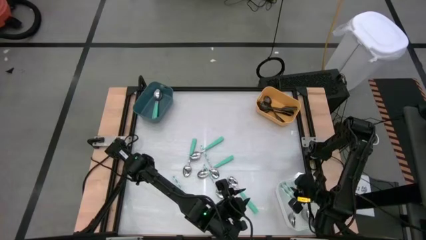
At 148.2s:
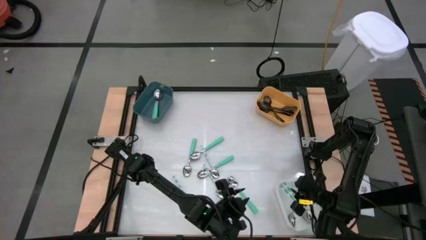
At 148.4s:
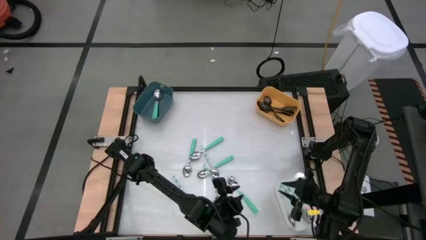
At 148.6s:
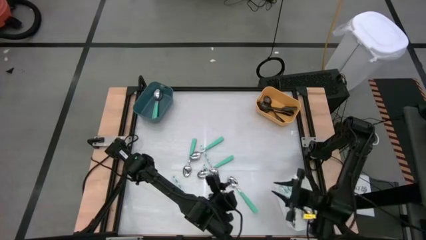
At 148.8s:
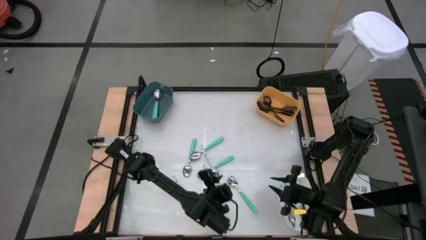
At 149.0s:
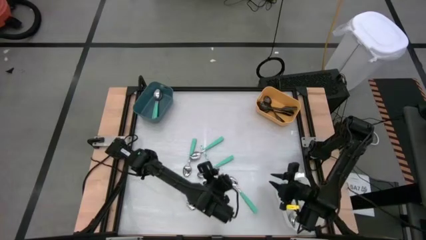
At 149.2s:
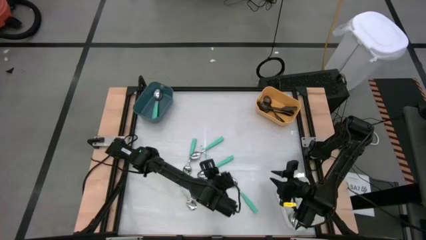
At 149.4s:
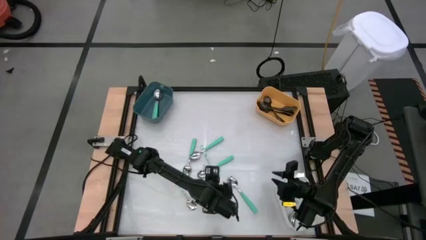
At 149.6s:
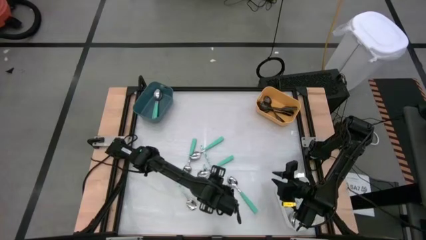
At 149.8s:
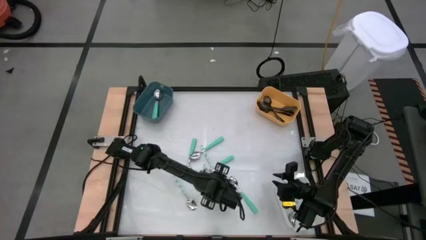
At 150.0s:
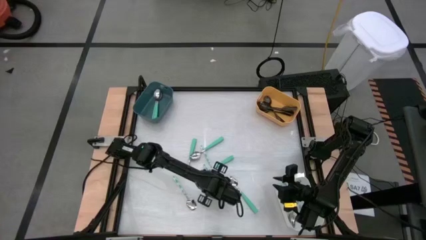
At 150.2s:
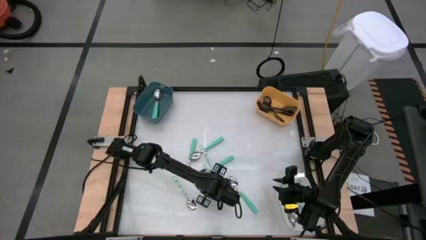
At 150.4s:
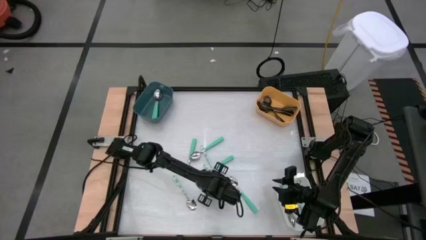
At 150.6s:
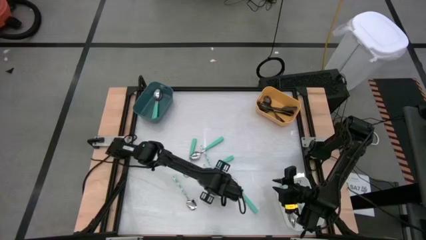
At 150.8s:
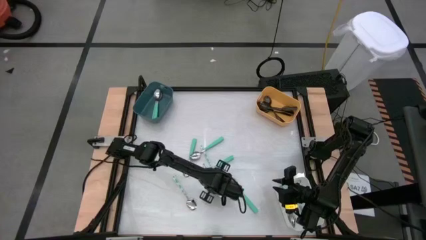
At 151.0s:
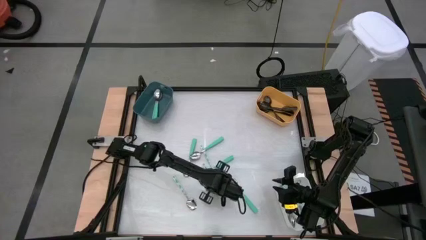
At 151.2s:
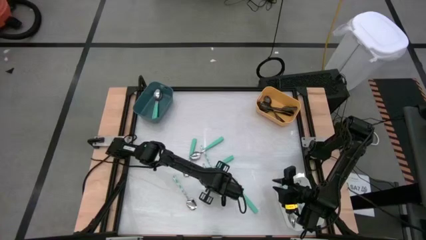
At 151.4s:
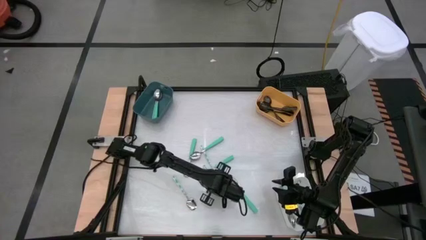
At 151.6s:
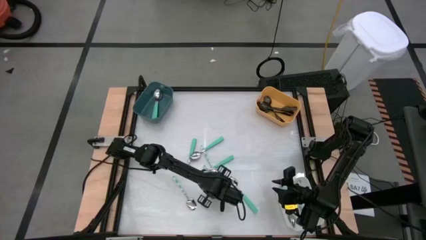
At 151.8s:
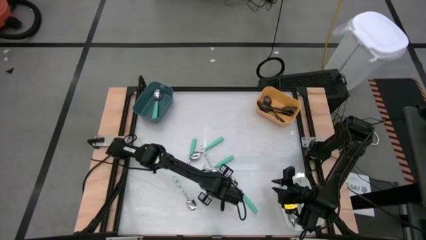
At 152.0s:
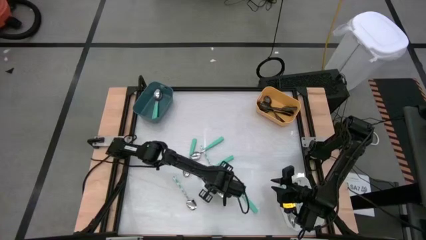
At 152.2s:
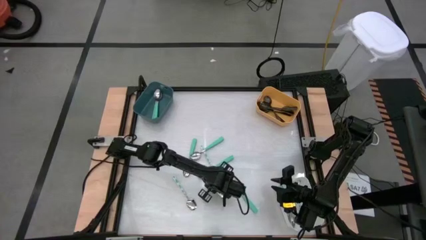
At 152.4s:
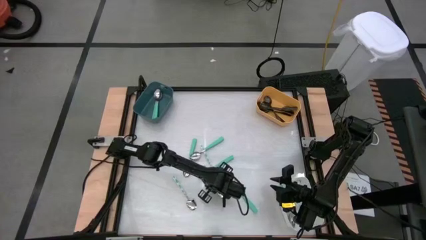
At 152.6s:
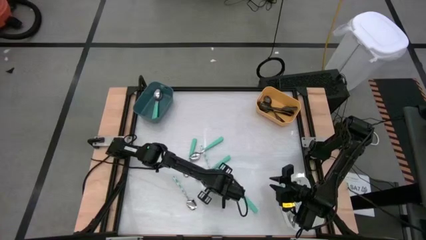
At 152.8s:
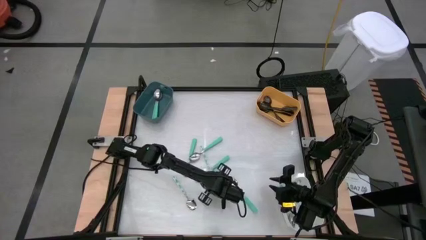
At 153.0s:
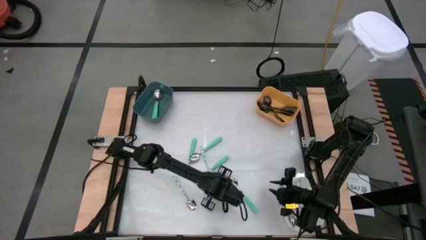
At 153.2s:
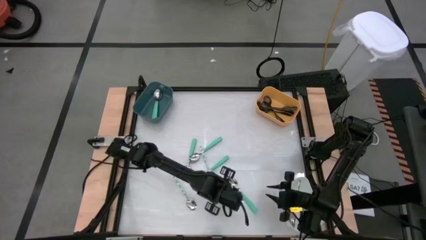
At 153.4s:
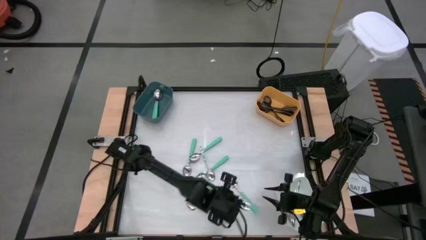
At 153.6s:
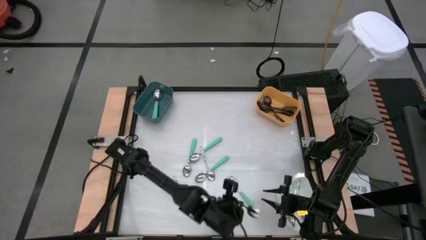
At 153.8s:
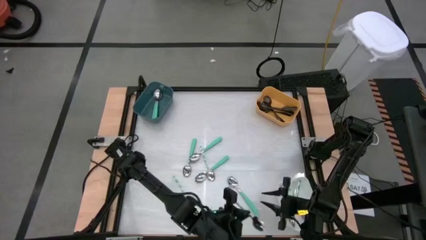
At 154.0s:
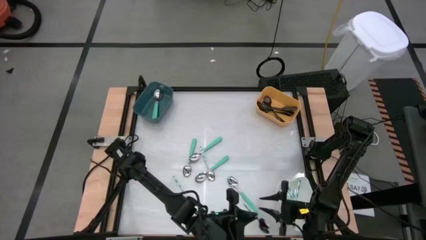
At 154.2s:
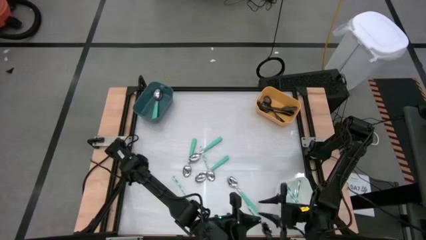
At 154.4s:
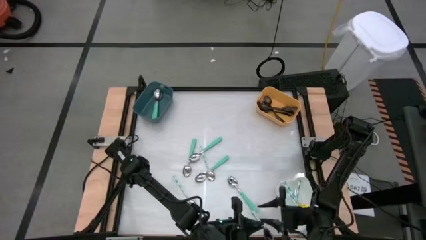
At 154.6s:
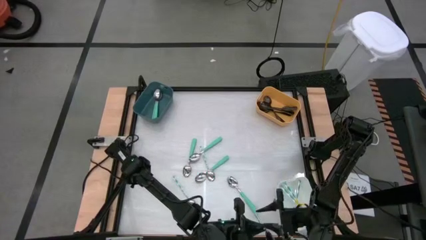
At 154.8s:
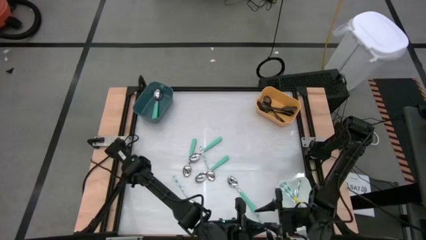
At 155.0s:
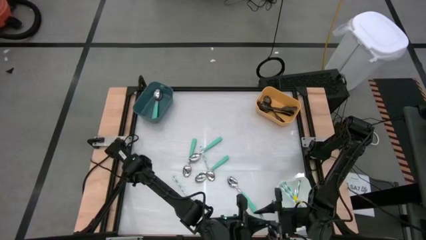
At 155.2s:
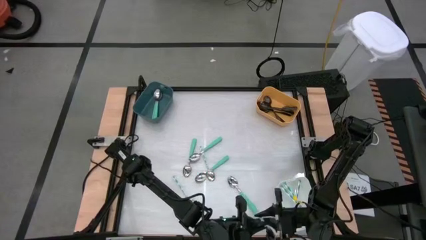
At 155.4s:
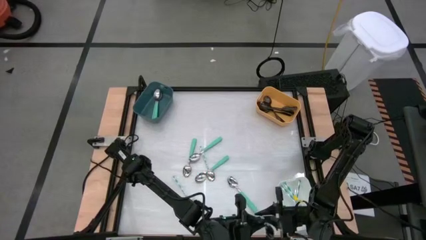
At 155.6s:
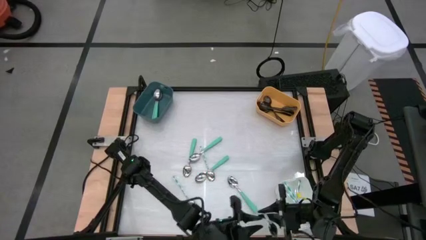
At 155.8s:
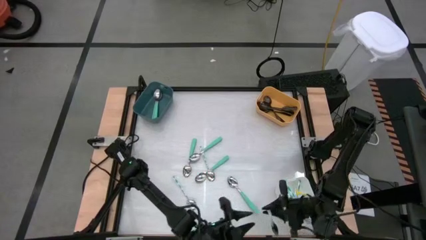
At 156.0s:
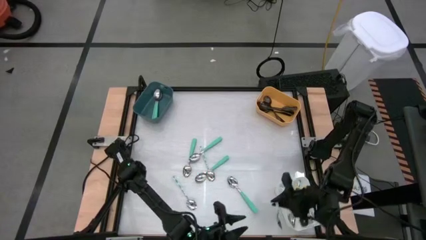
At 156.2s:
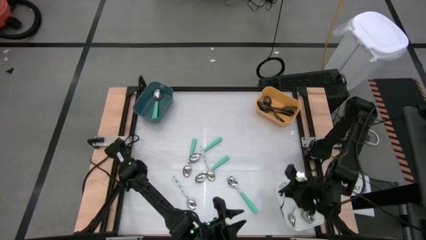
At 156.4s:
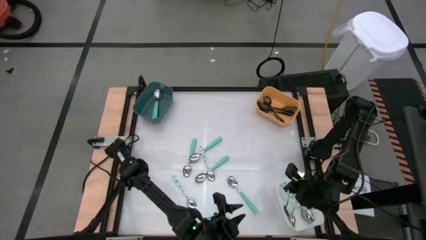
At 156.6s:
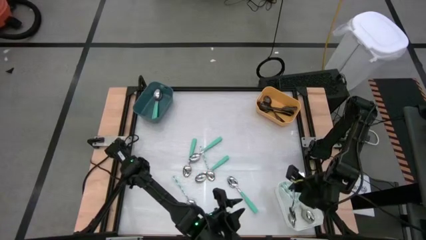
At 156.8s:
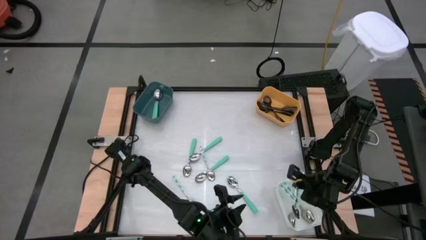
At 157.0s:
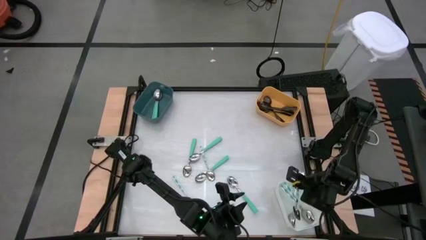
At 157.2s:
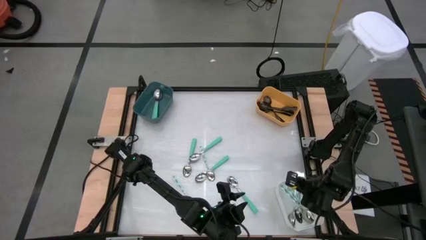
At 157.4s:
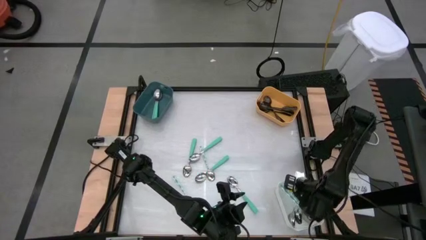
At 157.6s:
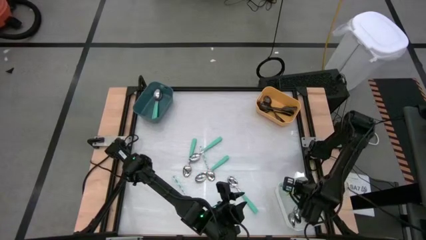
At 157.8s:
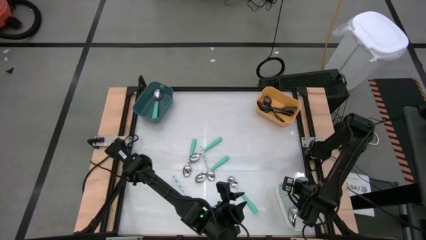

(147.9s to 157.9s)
Task: Sort silverware by color (type)
Put the patterned green spoon into the white bin

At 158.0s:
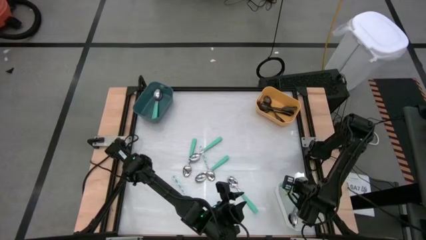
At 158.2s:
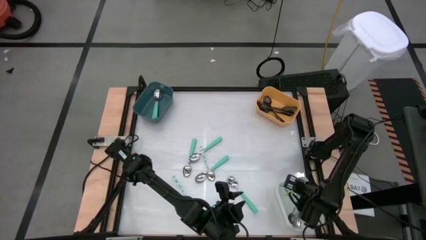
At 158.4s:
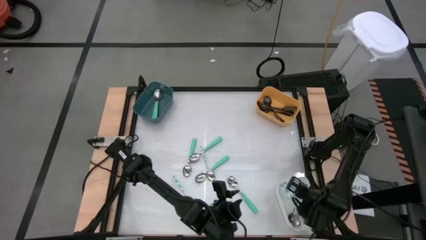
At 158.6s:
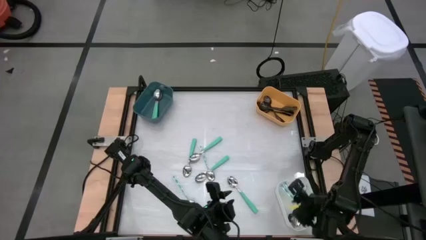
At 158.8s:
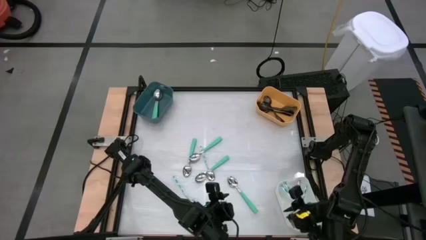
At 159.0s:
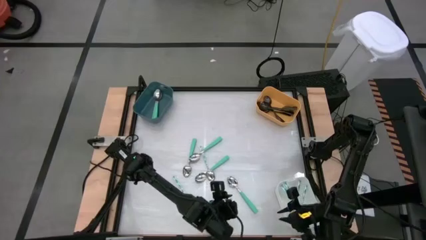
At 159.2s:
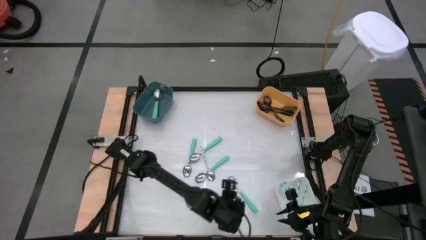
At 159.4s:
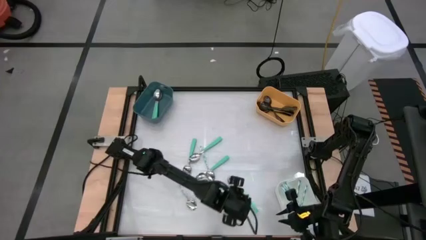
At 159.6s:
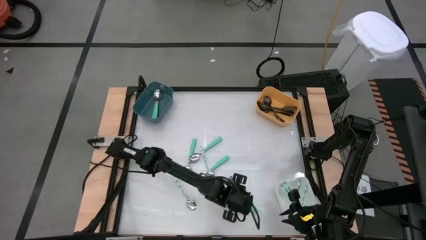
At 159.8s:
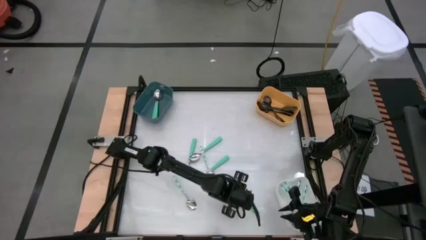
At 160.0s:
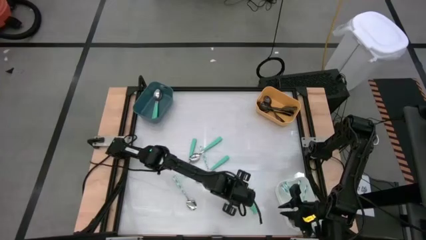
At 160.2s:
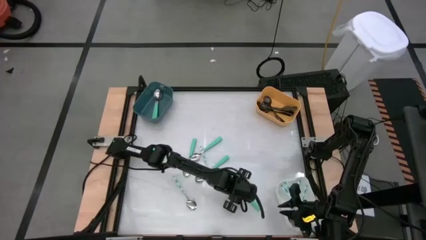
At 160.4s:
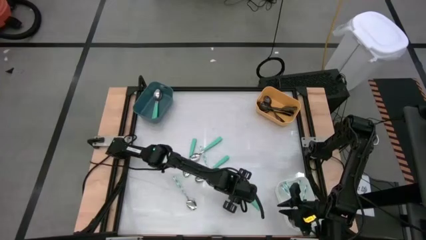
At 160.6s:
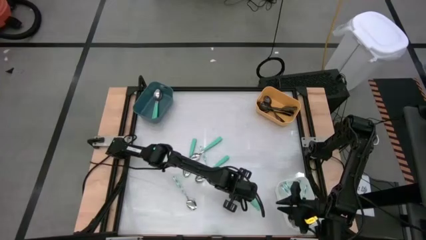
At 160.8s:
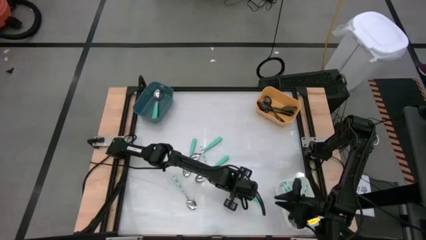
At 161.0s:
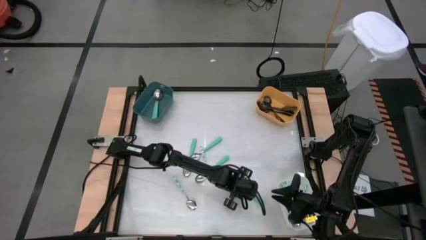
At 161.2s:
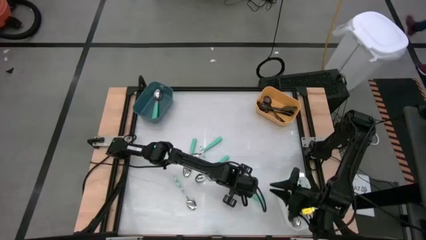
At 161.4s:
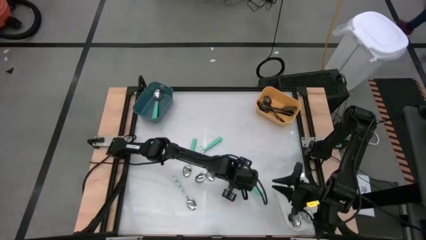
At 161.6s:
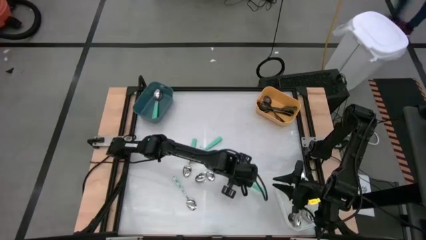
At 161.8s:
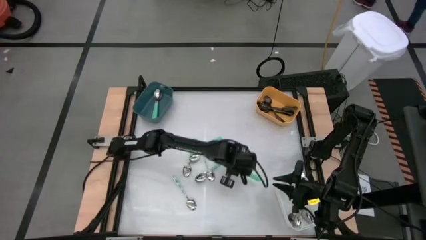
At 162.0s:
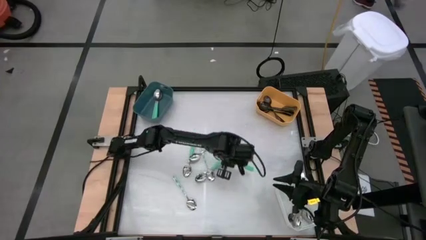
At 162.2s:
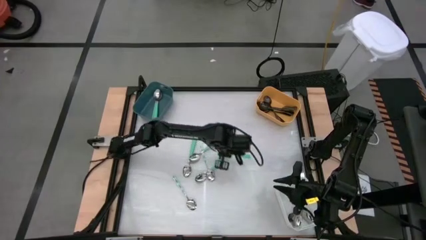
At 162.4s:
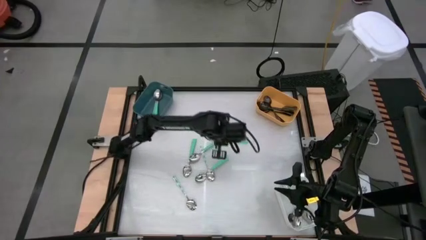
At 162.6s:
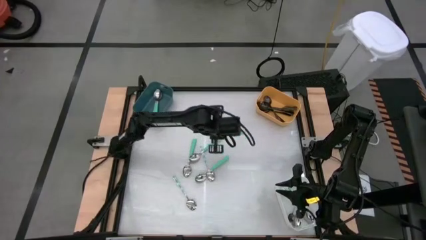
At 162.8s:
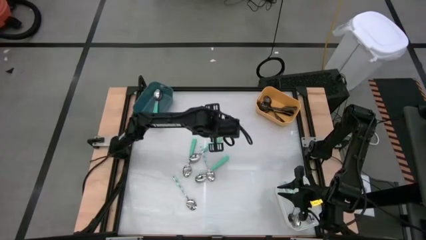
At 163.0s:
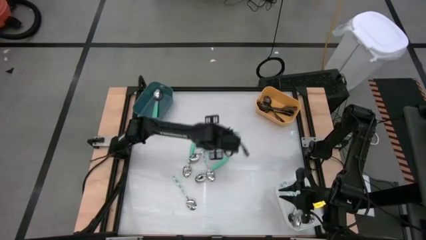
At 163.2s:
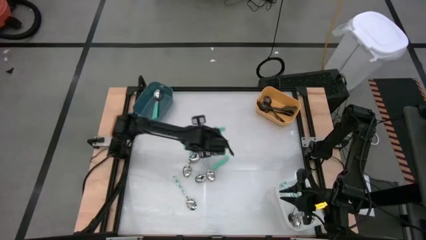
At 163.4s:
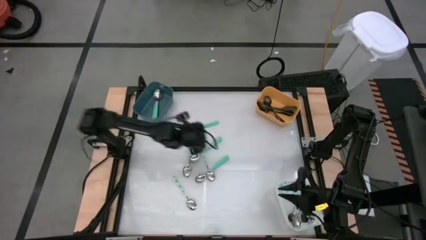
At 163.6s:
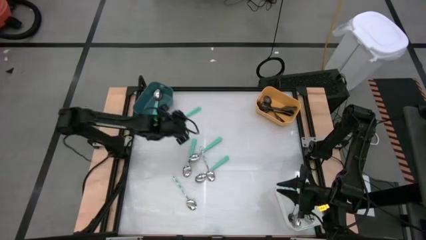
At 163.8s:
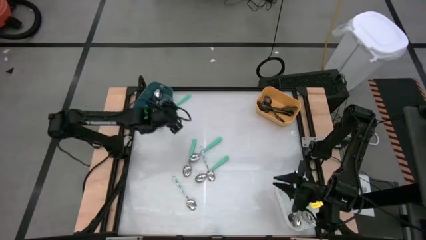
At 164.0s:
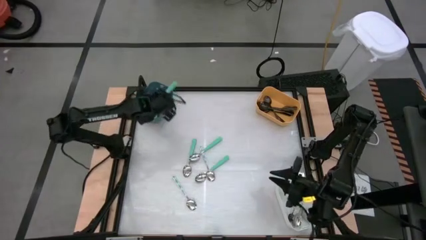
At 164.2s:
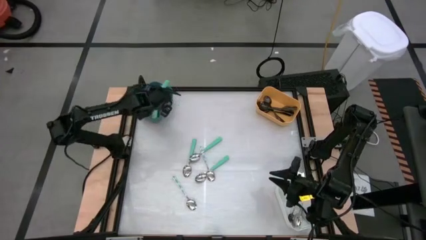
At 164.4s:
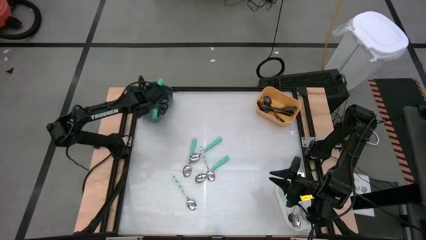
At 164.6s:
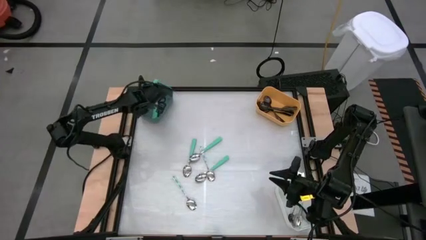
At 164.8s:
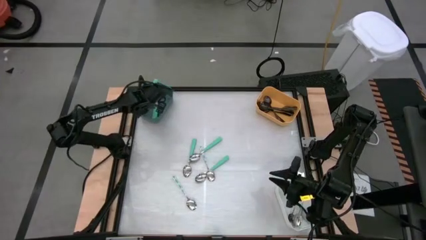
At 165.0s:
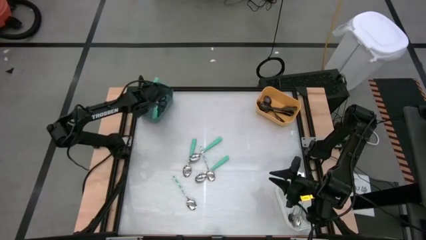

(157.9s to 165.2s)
Put the green spoon into the blue bin
